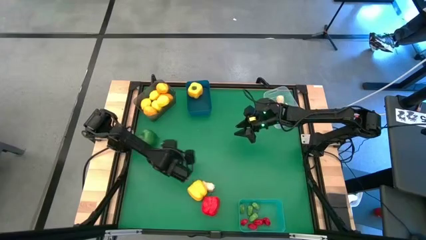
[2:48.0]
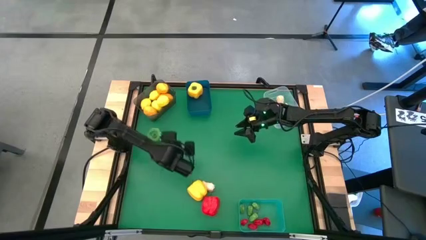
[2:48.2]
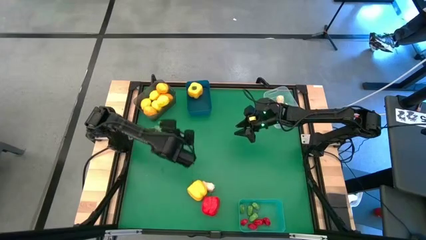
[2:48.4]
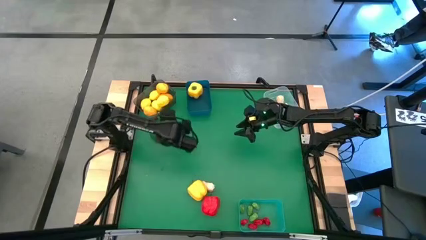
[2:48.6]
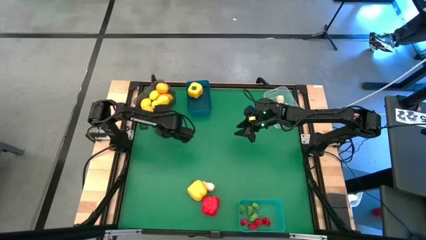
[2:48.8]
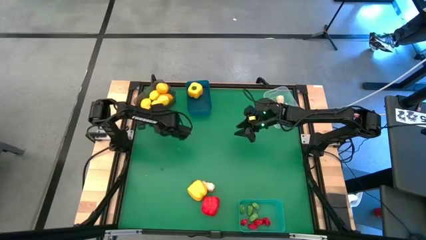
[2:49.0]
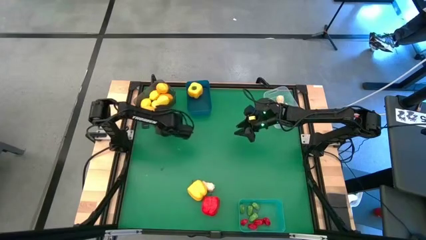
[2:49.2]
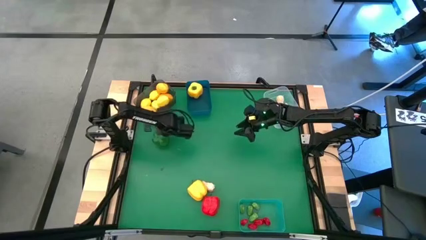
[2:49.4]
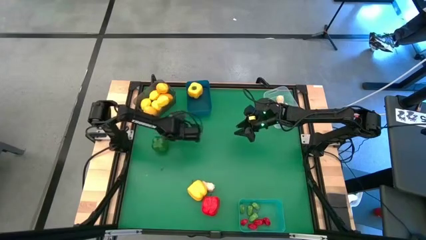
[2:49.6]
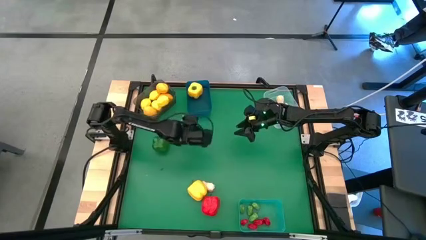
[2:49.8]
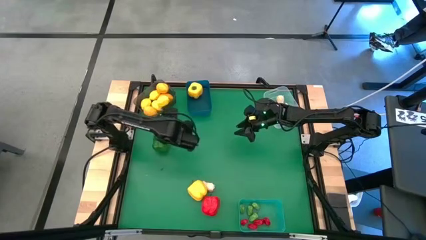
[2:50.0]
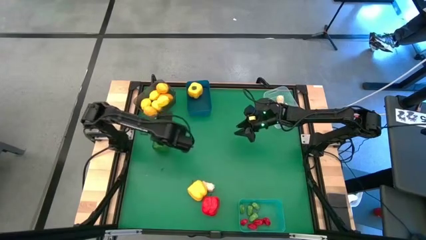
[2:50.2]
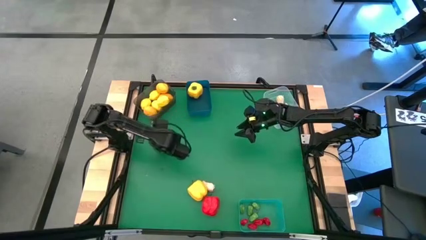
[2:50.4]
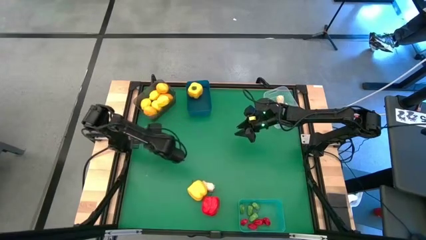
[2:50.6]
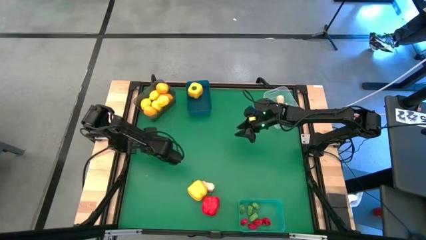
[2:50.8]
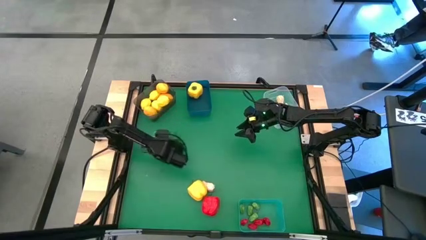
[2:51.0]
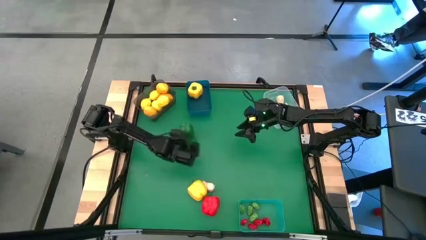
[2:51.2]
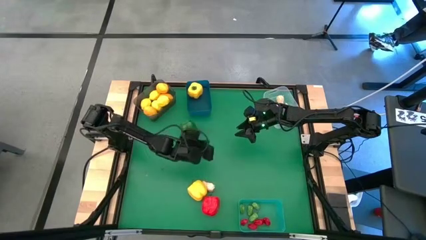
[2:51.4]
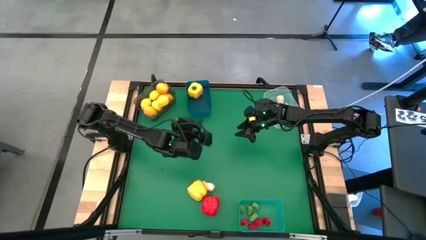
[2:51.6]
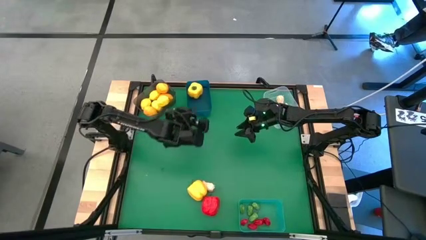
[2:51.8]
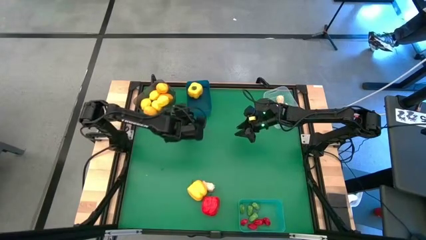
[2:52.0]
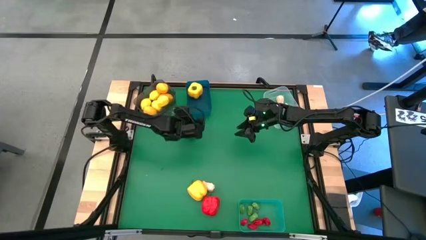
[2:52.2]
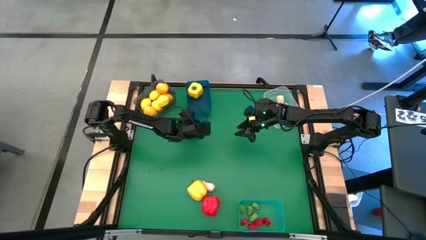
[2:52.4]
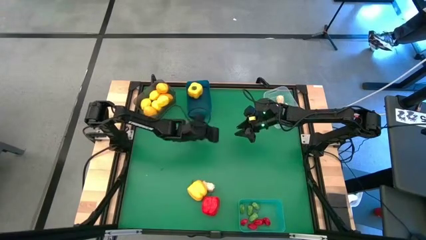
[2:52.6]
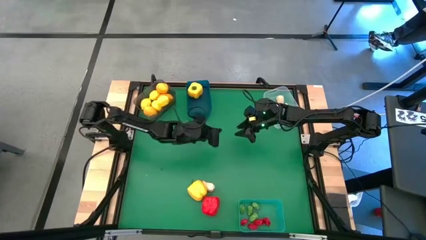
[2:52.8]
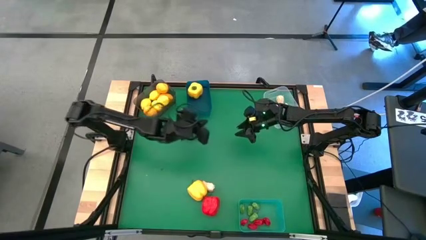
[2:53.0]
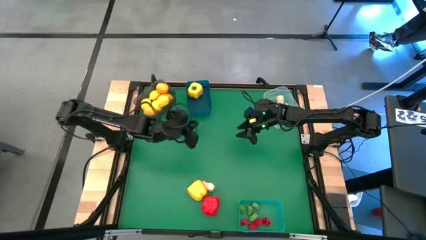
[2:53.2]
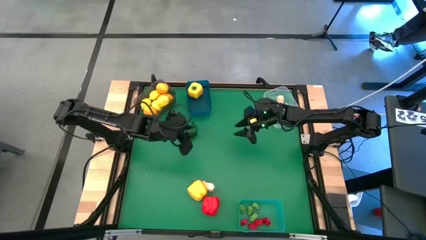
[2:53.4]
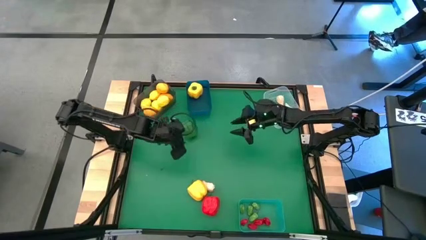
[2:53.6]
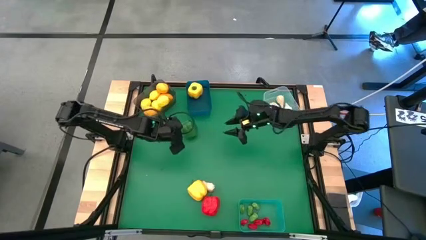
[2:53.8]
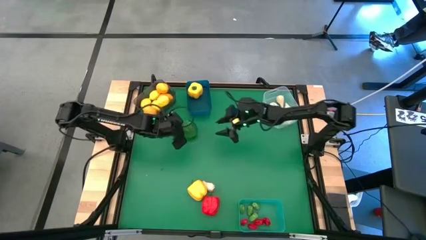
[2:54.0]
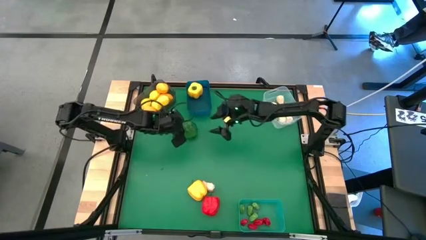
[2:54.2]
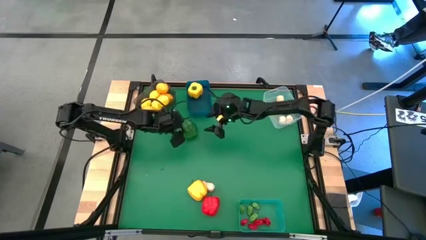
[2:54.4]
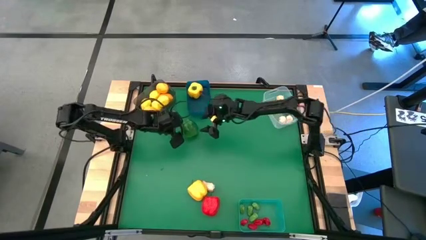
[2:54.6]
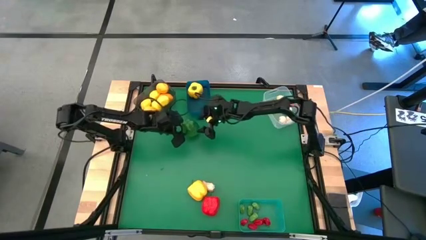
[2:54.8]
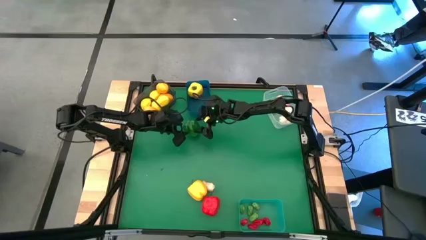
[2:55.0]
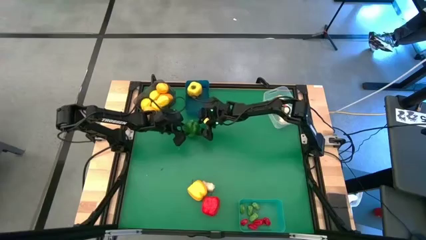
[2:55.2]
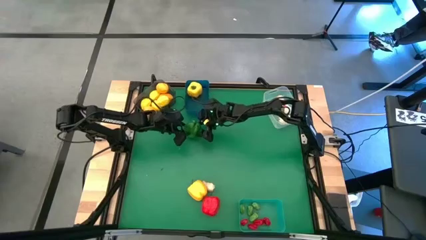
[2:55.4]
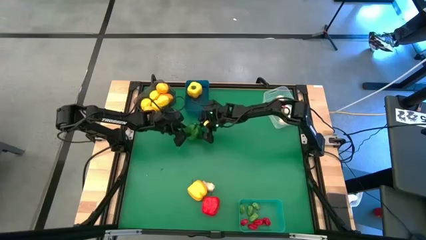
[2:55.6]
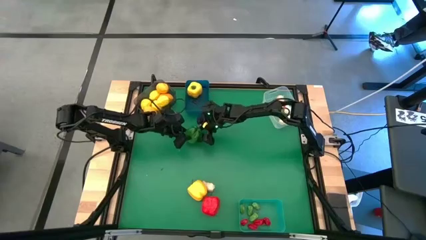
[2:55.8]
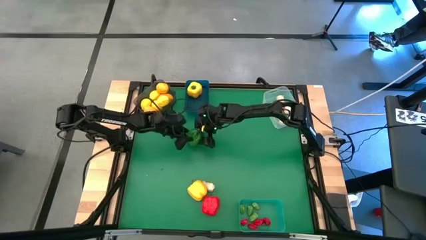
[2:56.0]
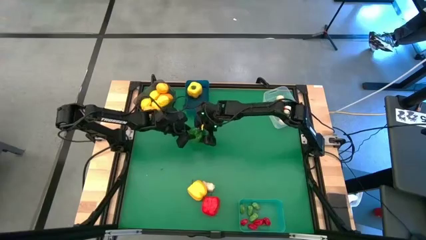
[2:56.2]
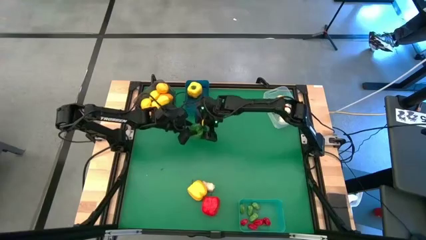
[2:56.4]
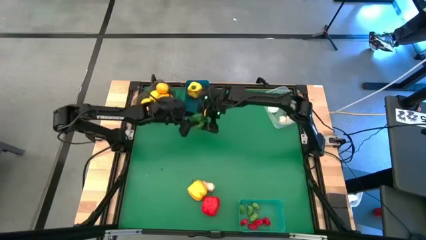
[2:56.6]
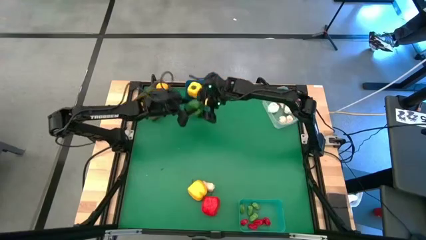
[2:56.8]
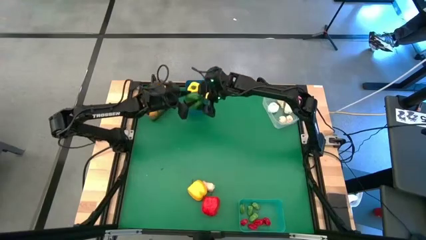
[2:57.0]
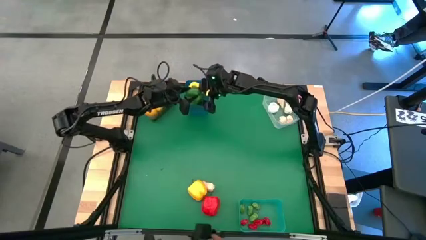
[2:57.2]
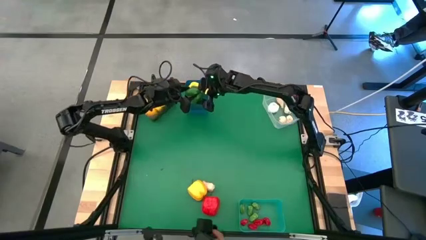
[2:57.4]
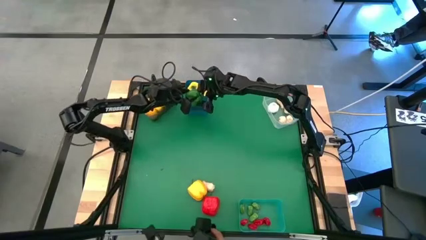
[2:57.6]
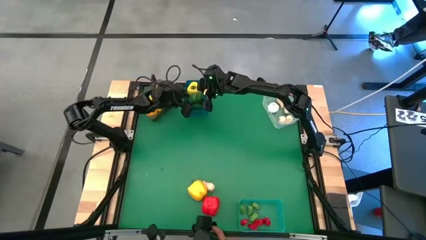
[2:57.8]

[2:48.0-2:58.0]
Task: Sort produce into baskets
Put the green bell pepper into the blue bin

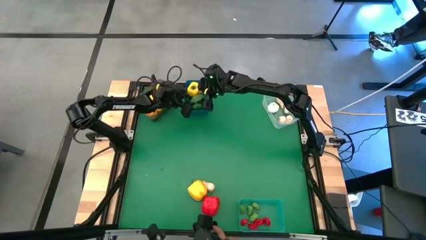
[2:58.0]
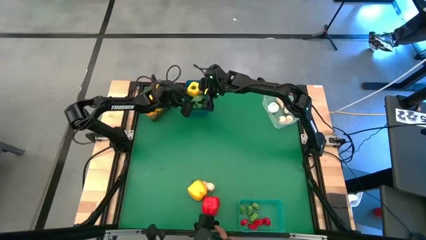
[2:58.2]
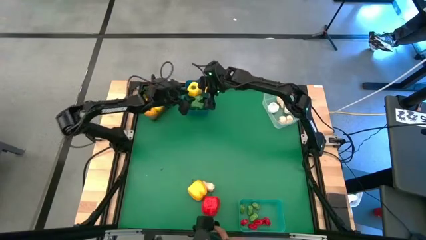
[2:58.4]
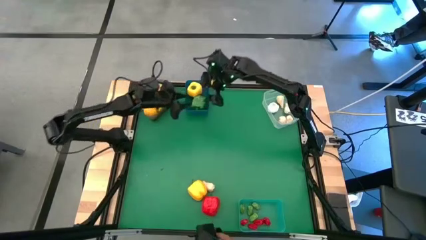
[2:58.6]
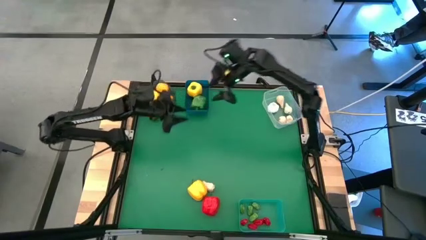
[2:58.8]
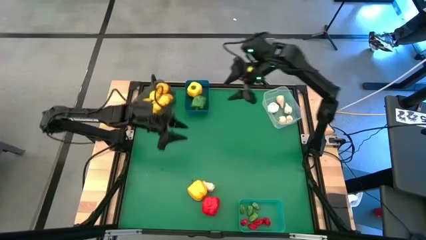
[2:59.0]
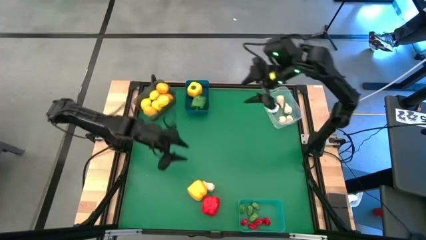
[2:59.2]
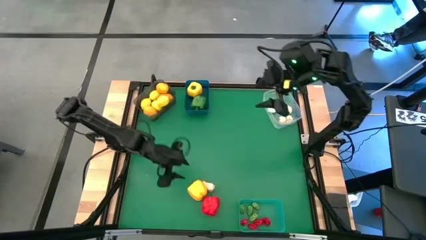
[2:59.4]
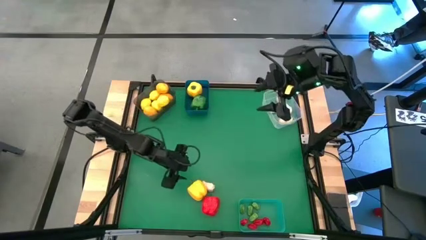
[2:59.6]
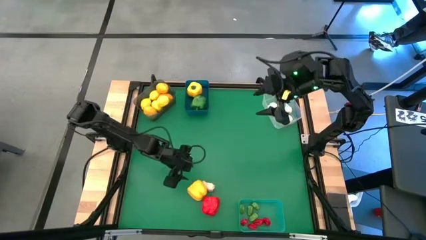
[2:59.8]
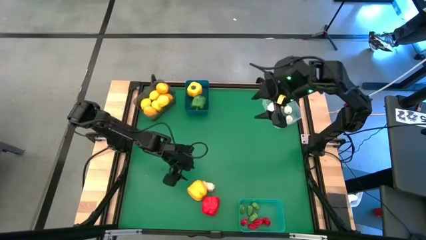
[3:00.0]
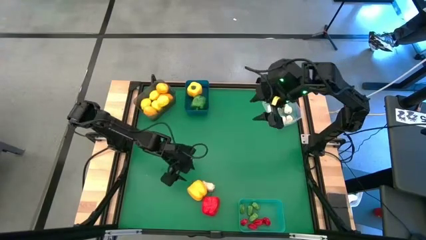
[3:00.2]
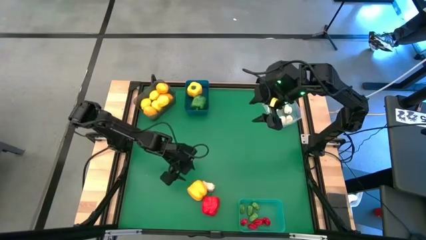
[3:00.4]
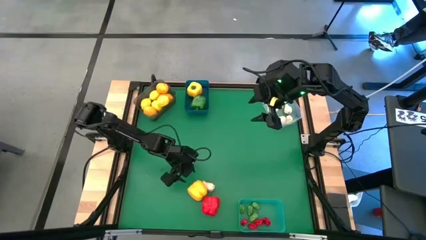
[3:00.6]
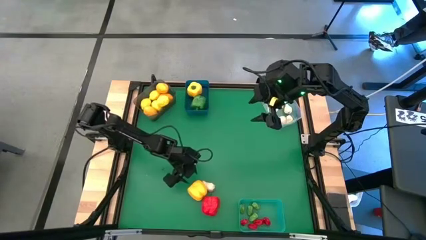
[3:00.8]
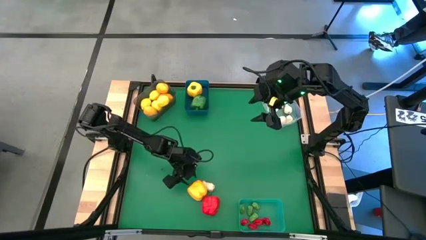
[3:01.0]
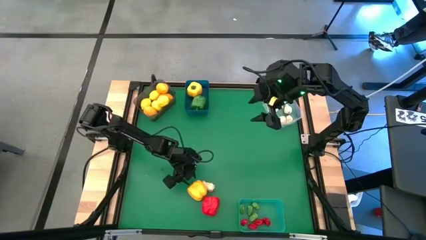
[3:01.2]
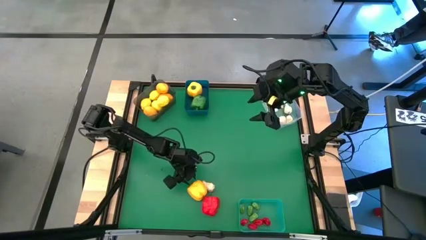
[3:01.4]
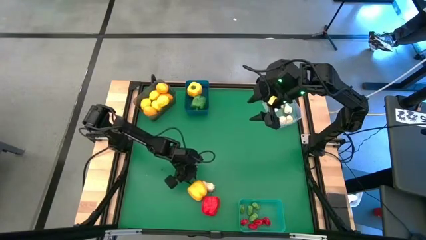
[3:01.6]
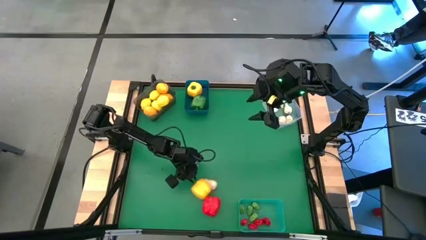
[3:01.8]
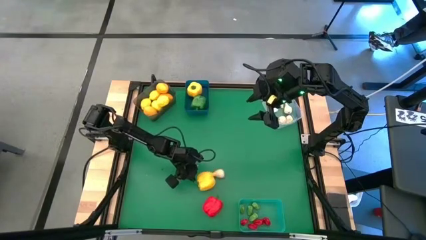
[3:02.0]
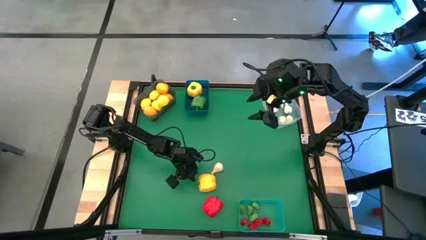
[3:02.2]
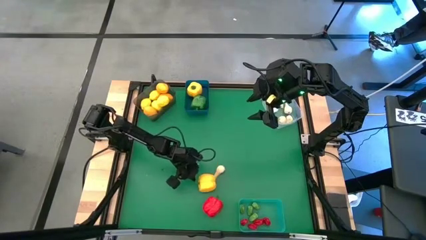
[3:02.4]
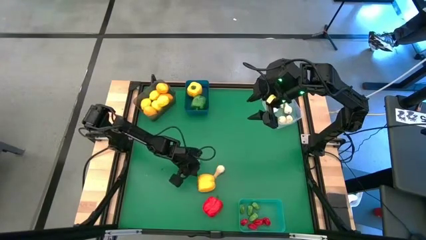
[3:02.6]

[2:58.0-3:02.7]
Put the yellow bell pepper into the blue bin
